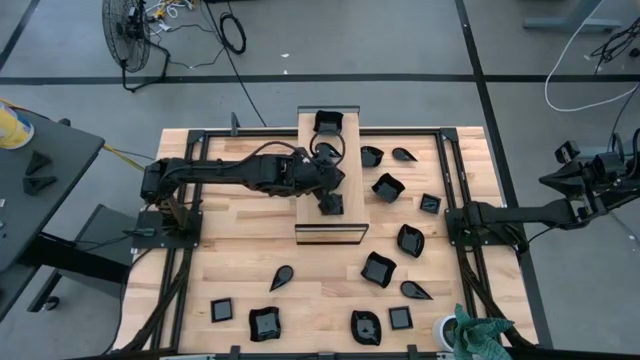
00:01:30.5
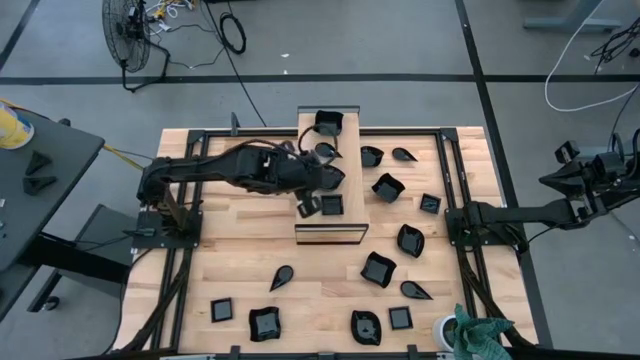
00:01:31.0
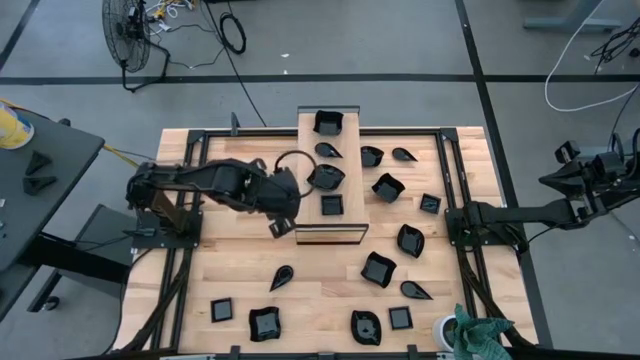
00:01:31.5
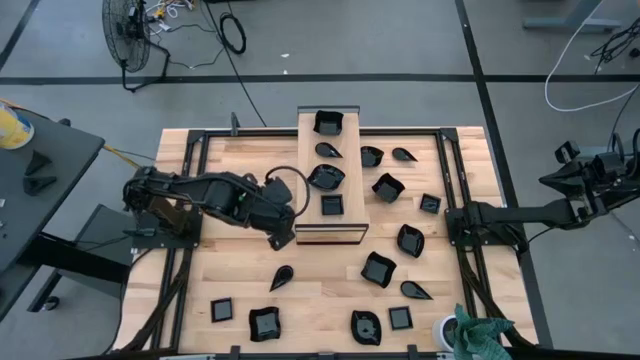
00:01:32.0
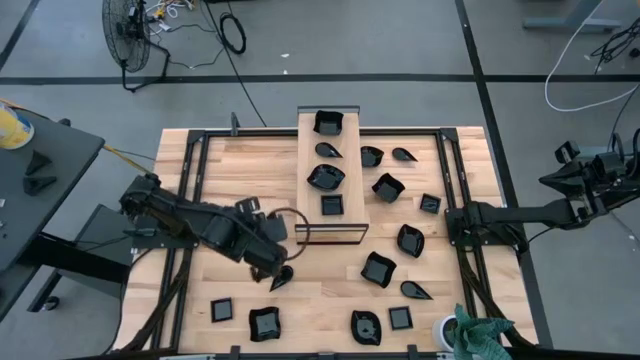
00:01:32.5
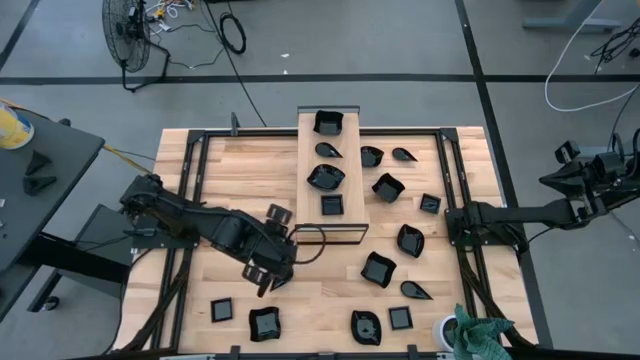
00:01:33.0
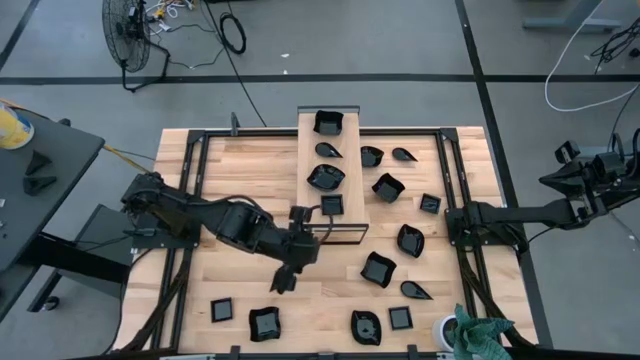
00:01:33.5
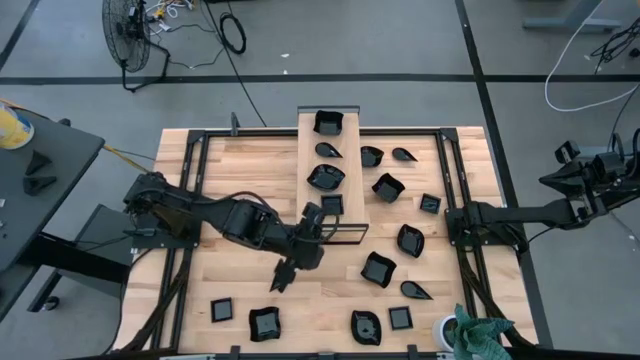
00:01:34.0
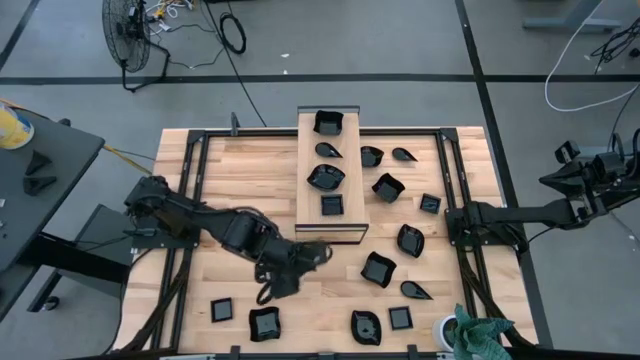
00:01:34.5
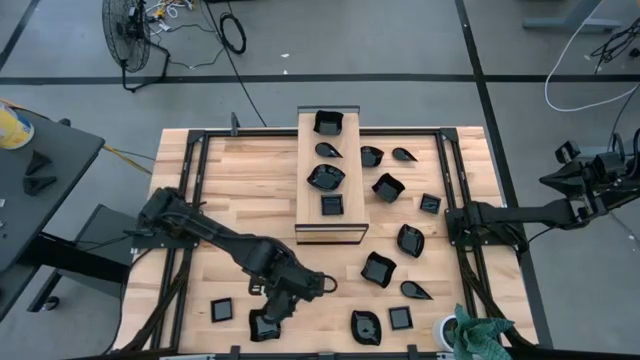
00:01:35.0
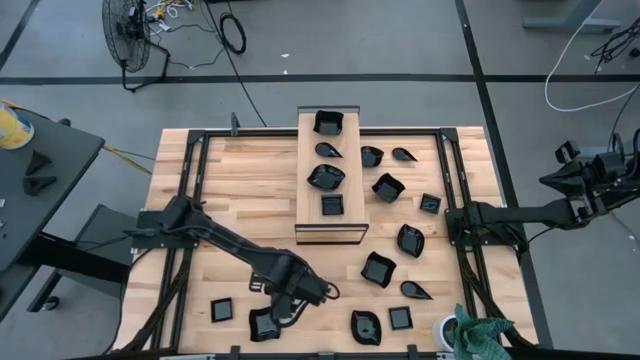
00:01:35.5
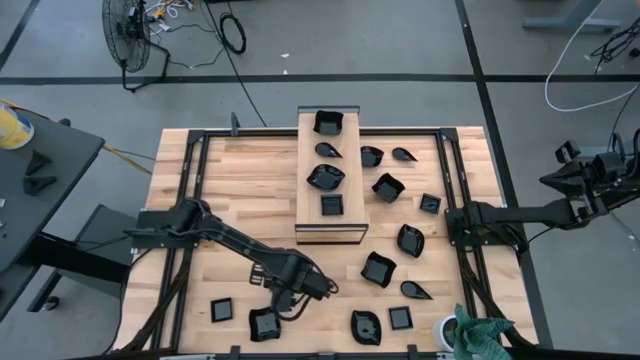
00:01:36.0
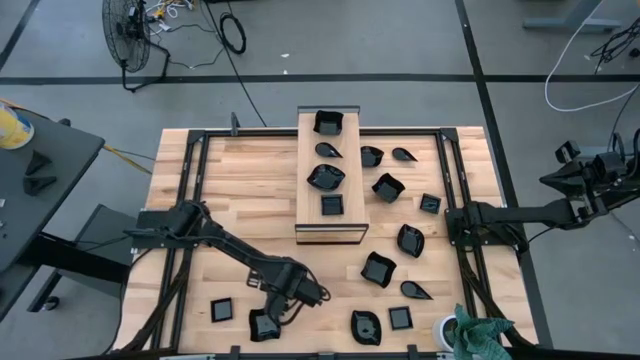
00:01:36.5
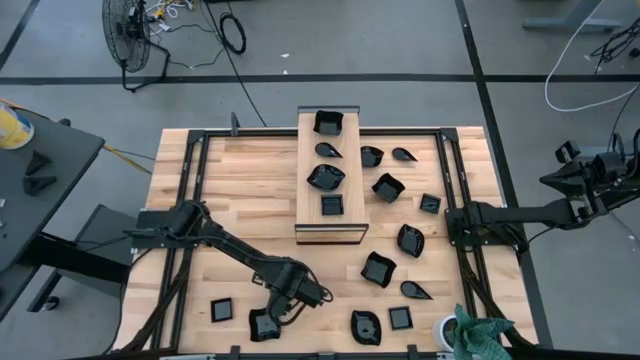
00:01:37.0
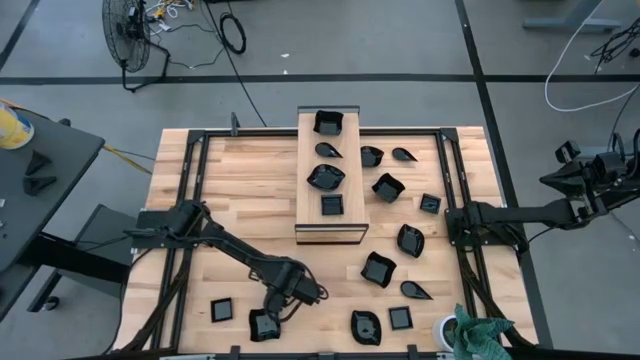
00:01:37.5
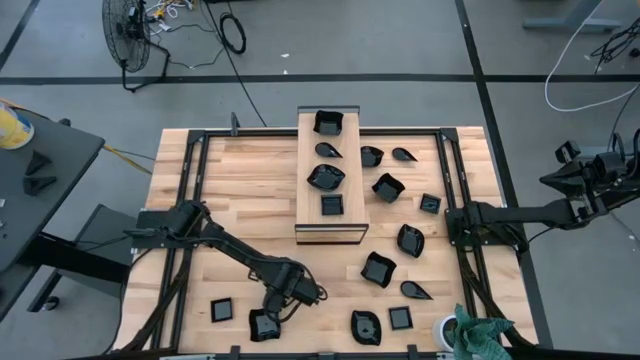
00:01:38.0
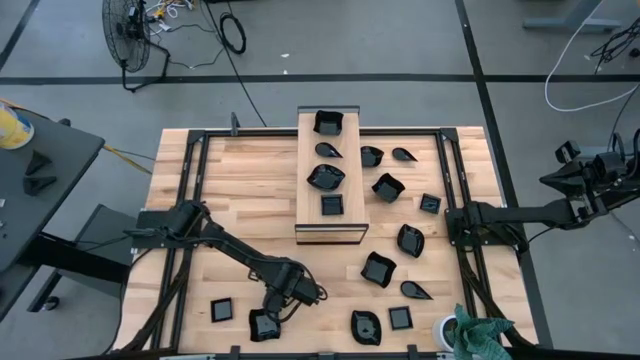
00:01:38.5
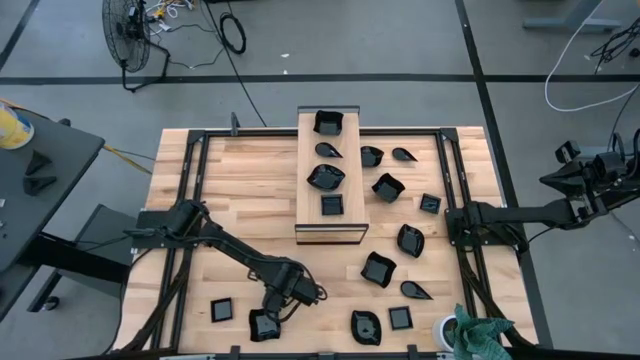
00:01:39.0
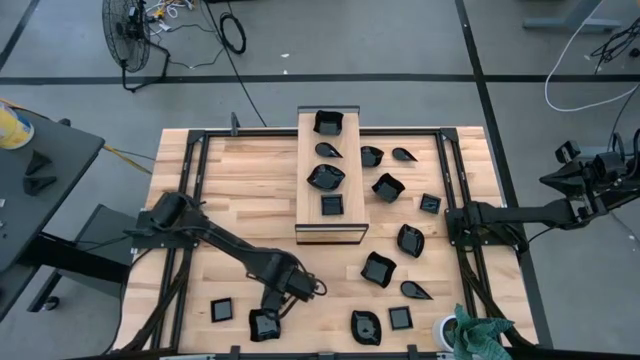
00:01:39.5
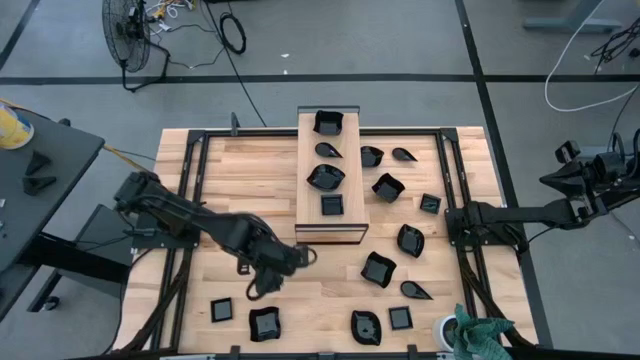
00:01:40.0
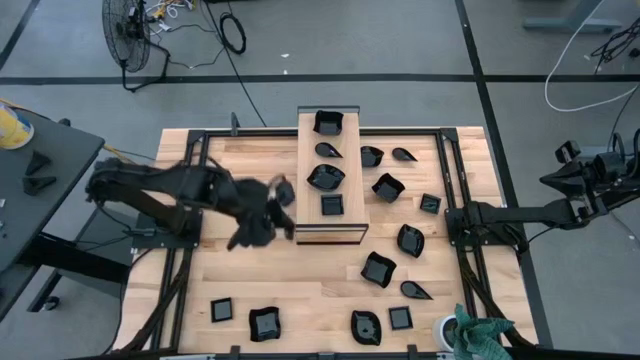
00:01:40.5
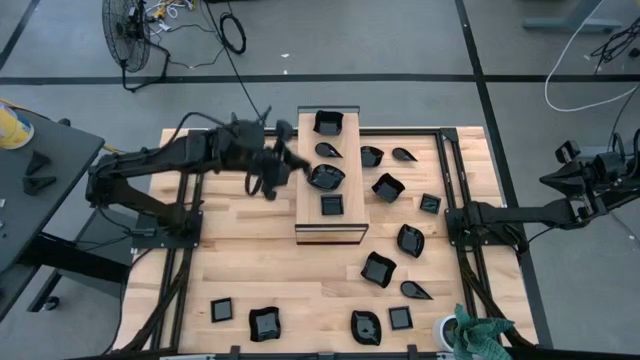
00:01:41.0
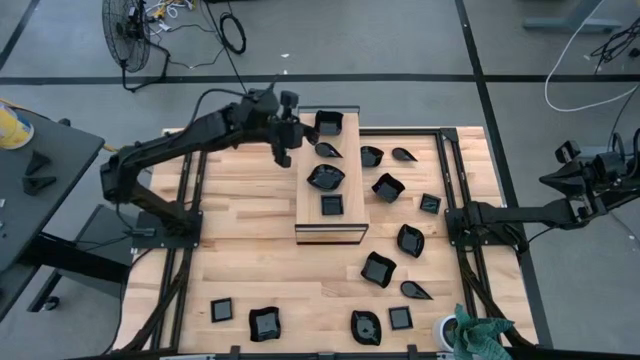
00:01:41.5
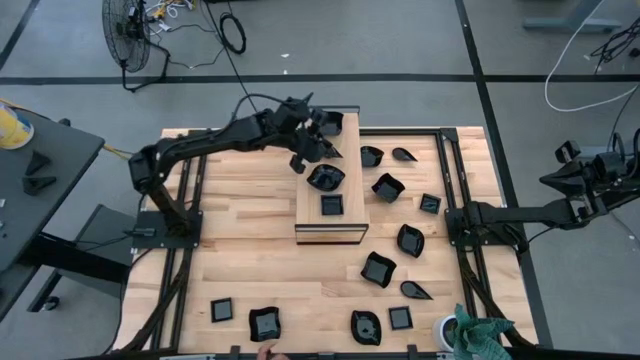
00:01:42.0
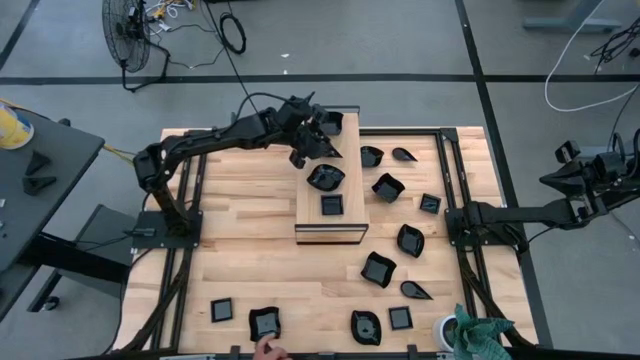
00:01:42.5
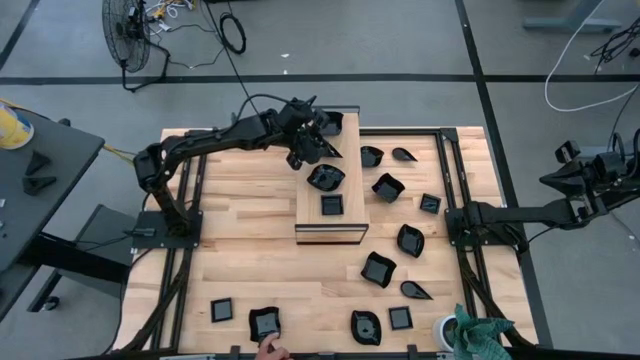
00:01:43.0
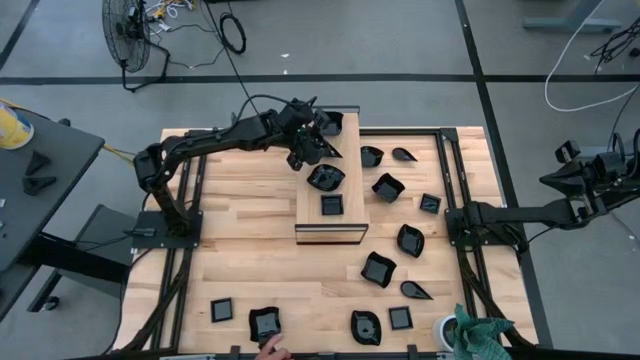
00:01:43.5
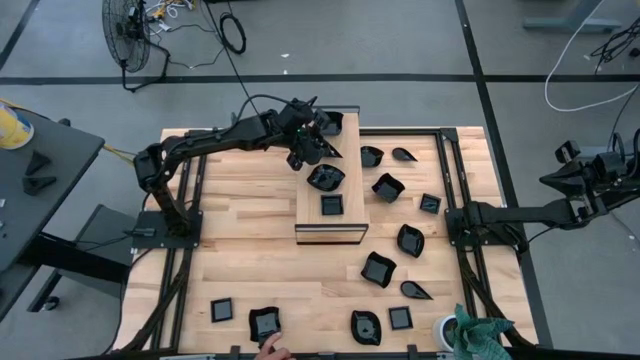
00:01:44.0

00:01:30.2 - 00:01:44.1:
Task: Pick & Place Mini shaped plates
Stack the drop-shaped plate on top of the drop-shaped plate on the shelf

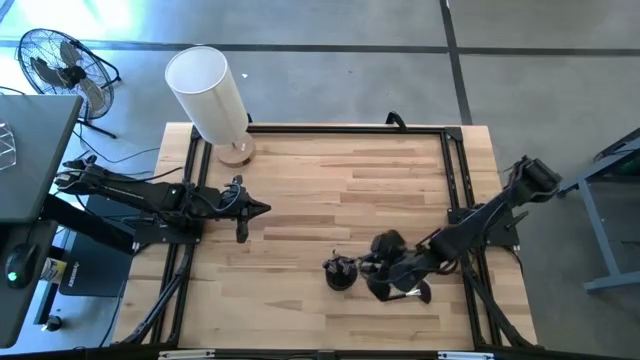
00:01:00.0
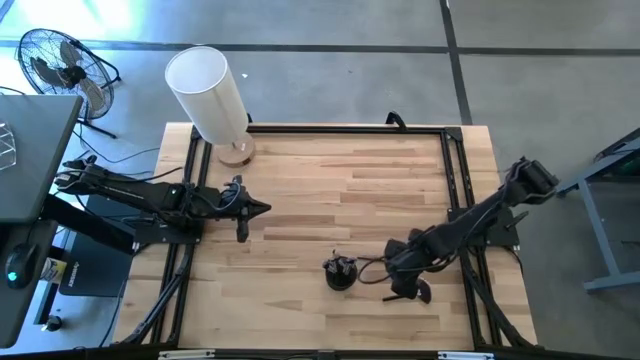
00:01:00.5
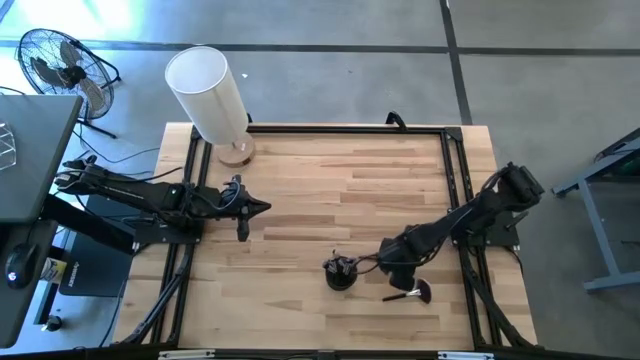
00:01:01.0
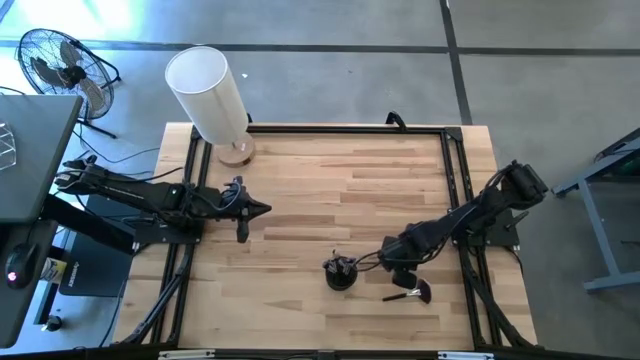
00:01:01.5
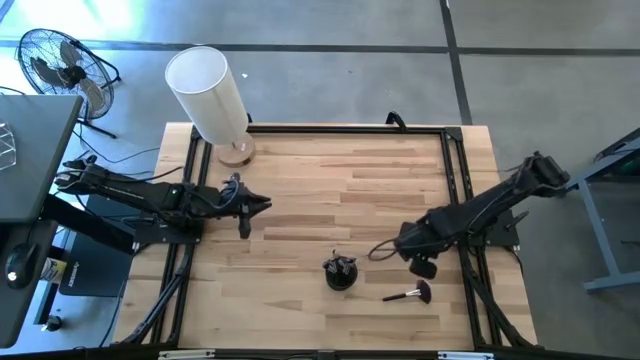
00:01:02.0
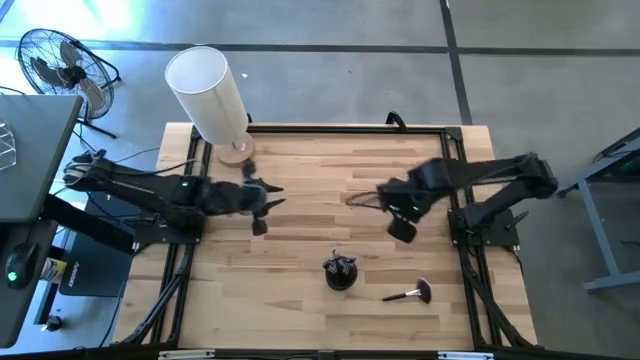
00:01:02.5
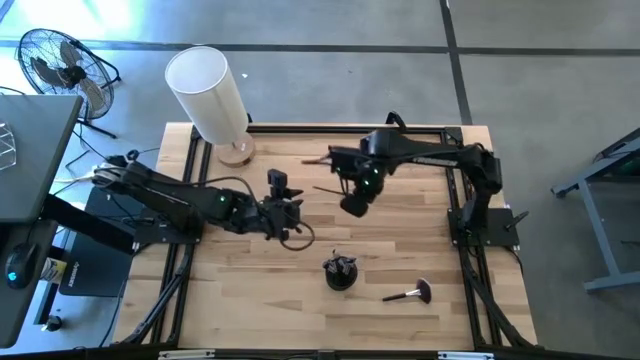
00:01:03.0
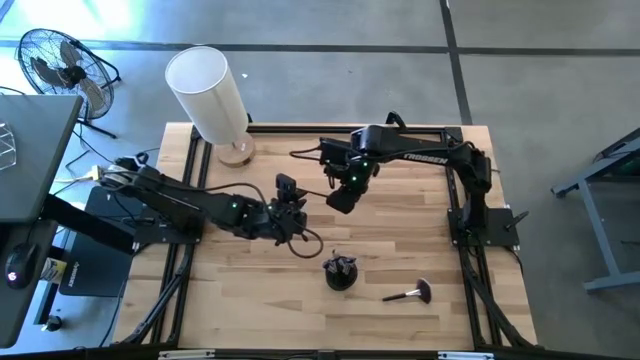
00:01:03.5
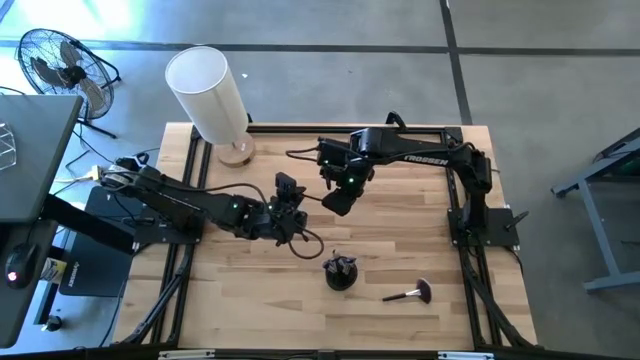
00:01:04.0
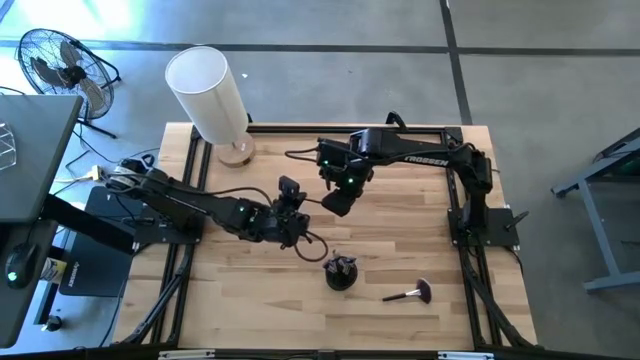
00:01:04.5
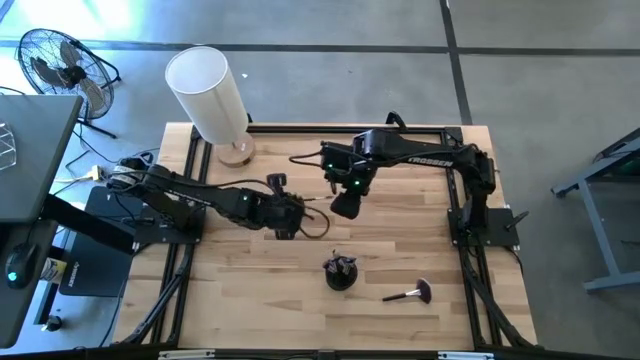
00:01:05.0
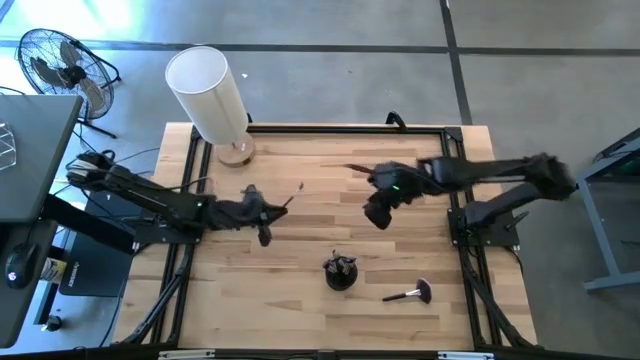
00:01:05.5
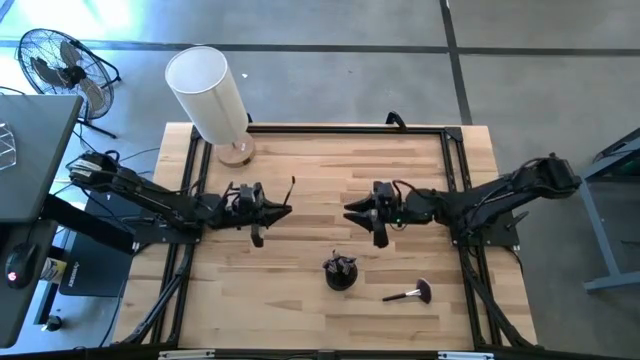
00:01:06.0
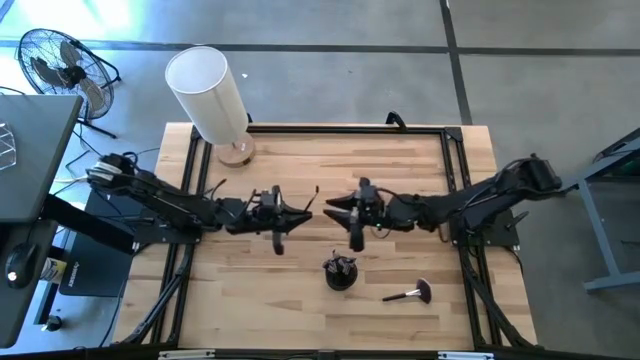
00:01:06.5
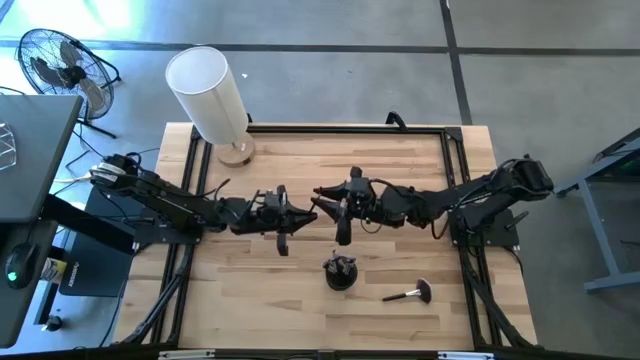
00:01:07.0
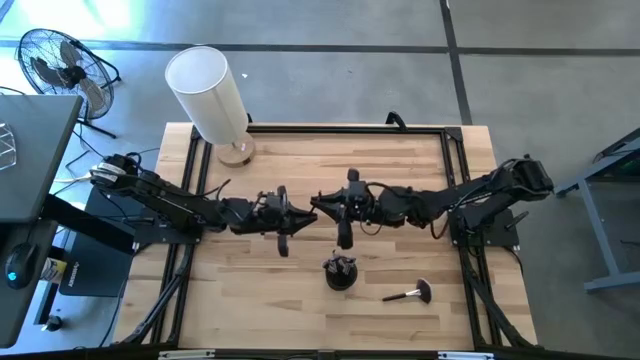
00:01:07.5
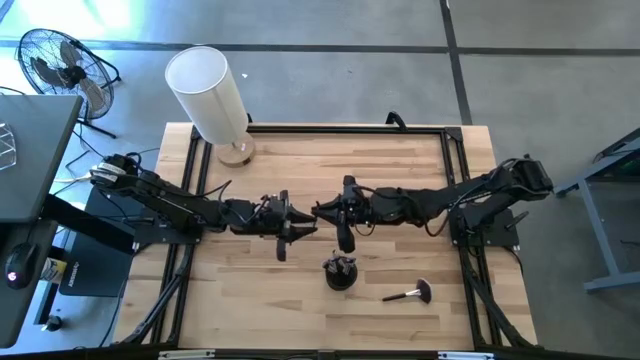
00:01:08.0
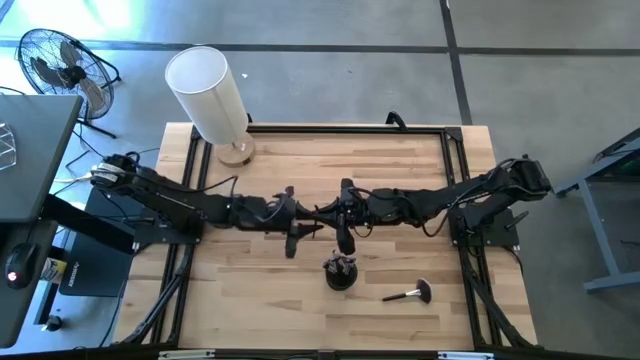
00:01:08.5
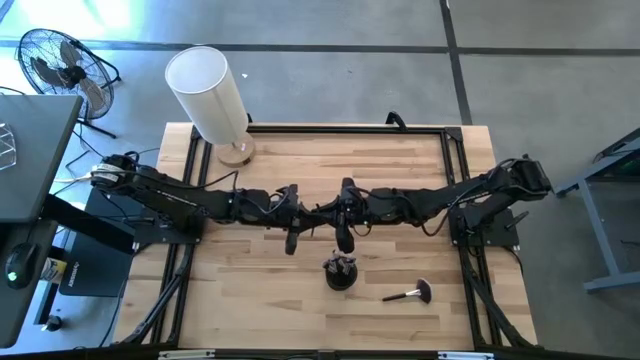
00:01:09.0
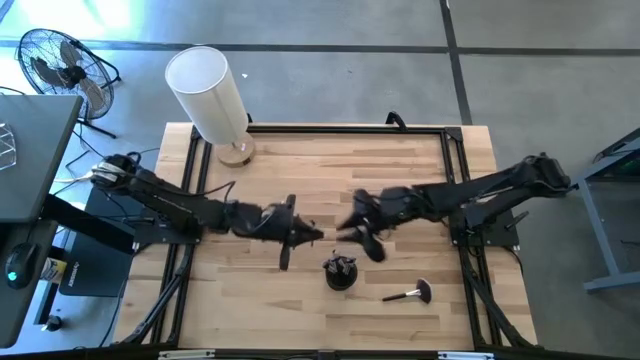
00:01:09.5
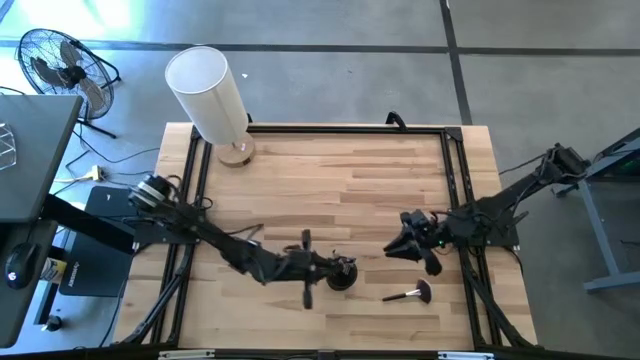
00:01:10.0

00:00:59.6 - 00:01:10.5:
Task: Pick & Place Makeup Supplies
Put the makeup brush into the black makeup holder
